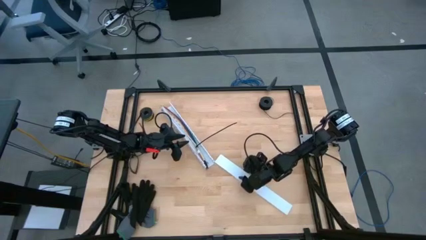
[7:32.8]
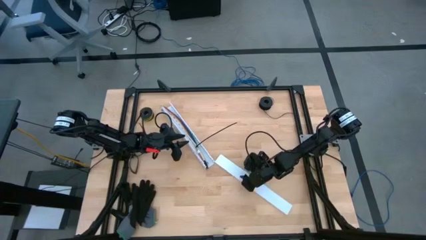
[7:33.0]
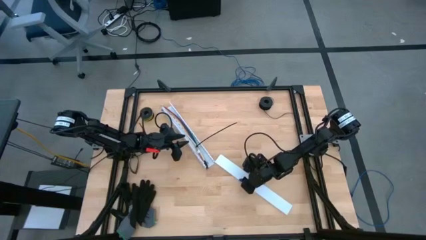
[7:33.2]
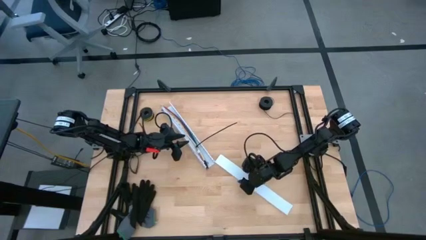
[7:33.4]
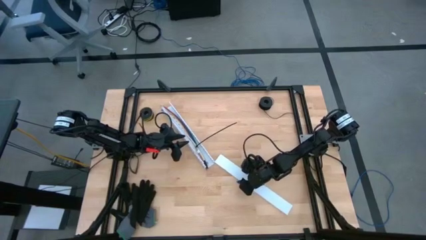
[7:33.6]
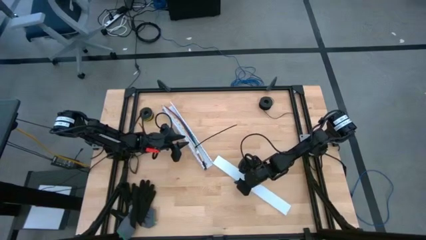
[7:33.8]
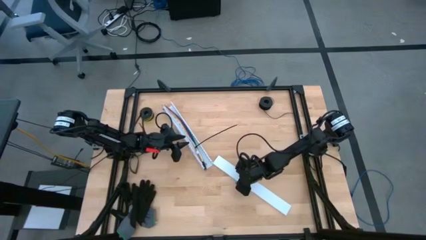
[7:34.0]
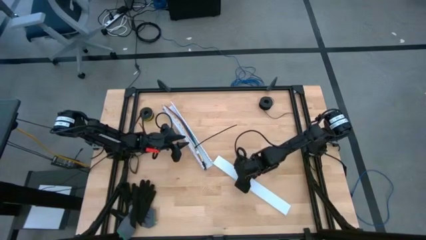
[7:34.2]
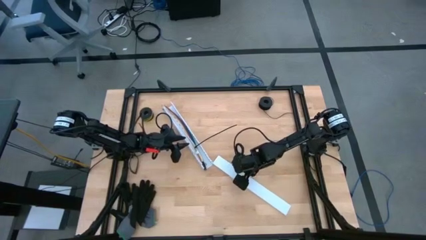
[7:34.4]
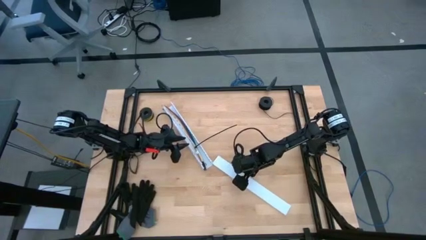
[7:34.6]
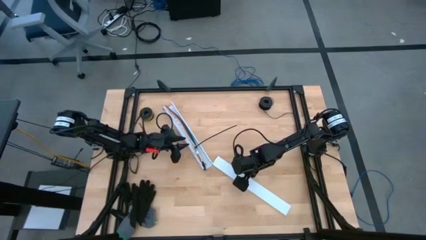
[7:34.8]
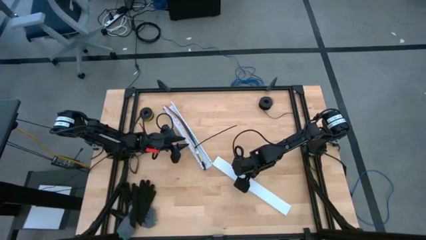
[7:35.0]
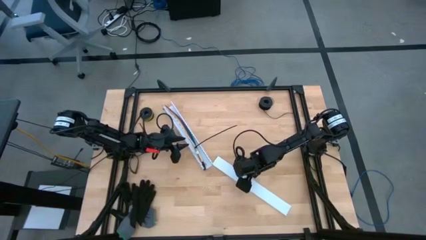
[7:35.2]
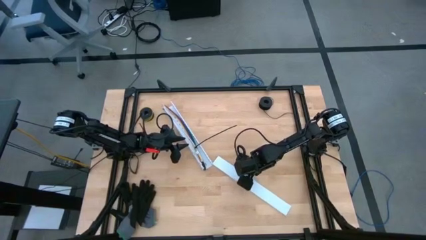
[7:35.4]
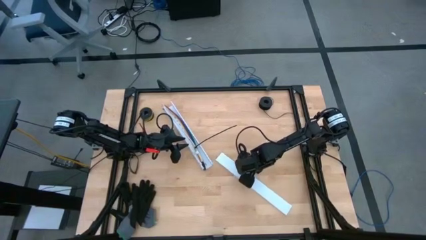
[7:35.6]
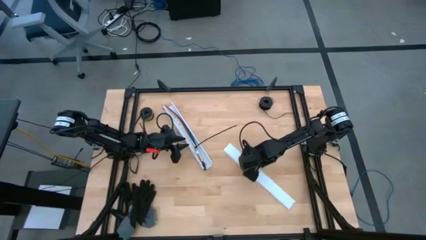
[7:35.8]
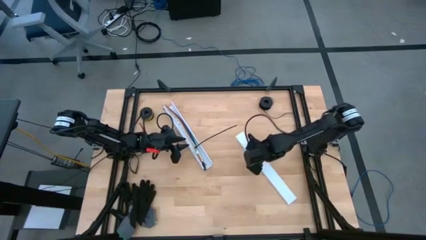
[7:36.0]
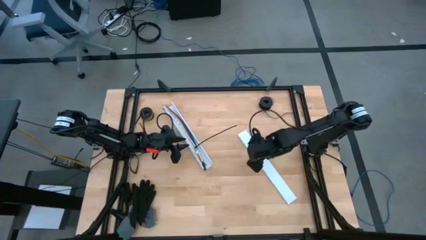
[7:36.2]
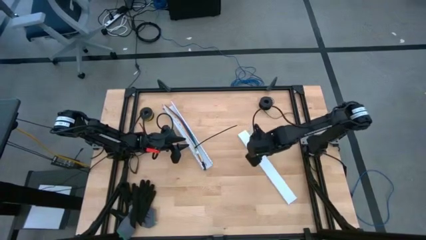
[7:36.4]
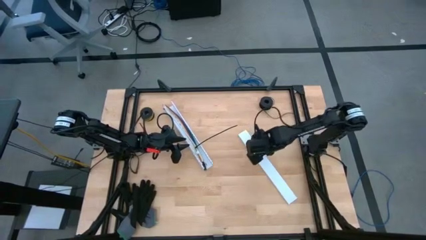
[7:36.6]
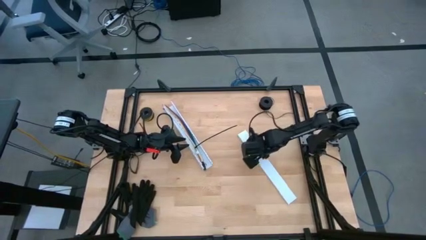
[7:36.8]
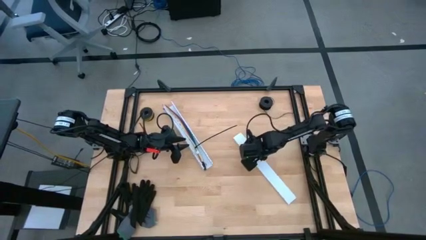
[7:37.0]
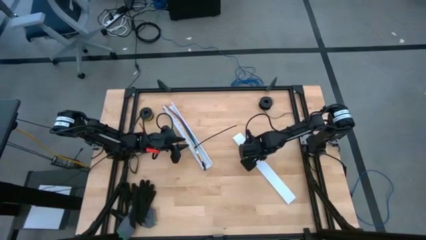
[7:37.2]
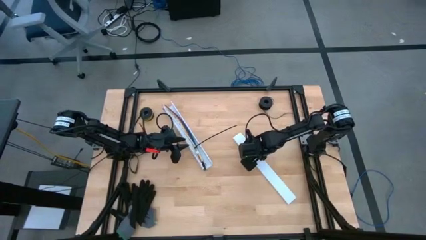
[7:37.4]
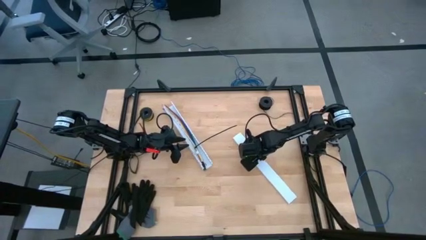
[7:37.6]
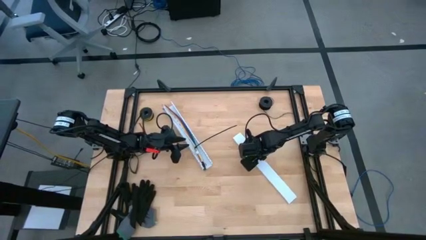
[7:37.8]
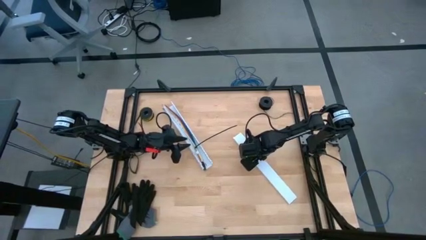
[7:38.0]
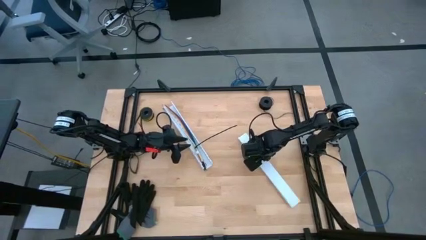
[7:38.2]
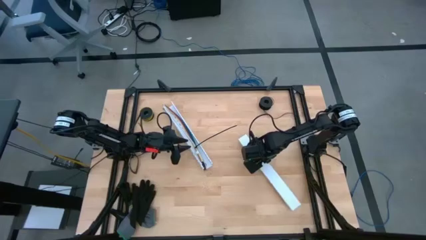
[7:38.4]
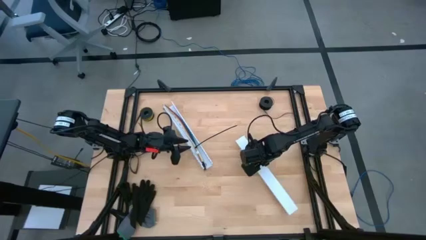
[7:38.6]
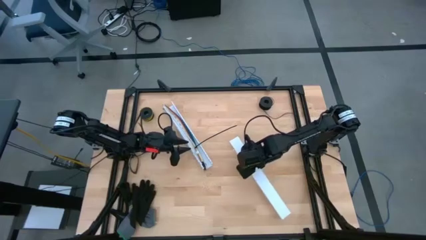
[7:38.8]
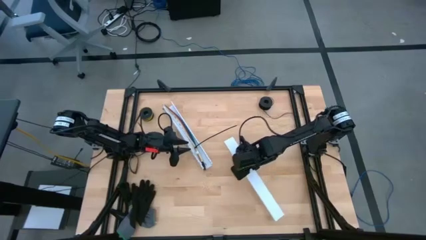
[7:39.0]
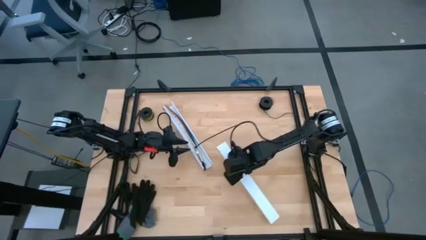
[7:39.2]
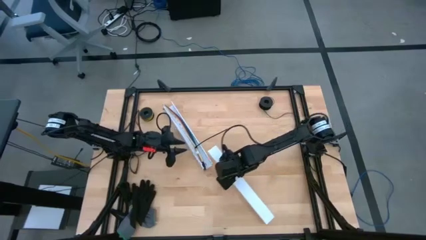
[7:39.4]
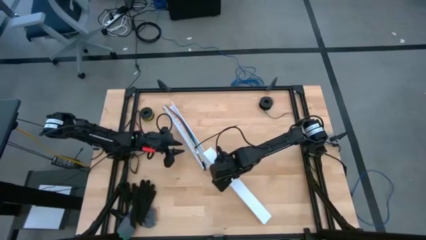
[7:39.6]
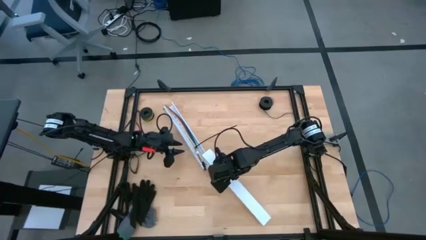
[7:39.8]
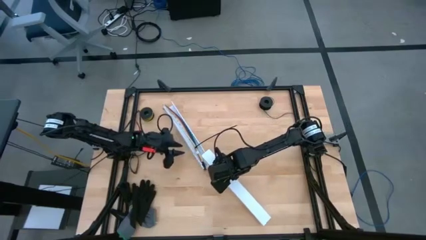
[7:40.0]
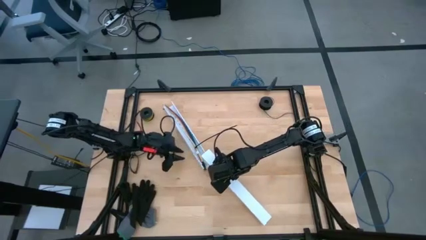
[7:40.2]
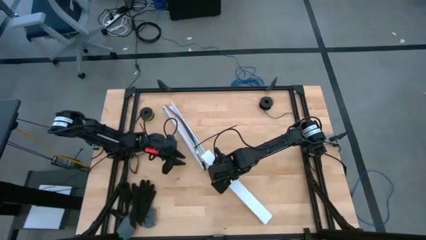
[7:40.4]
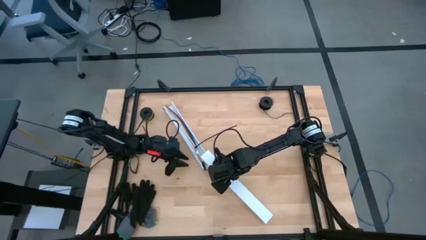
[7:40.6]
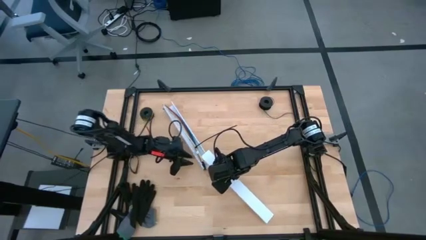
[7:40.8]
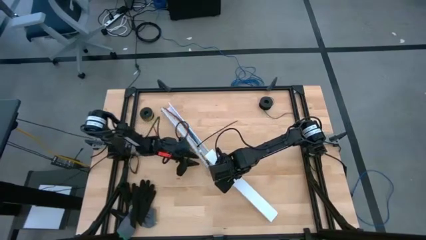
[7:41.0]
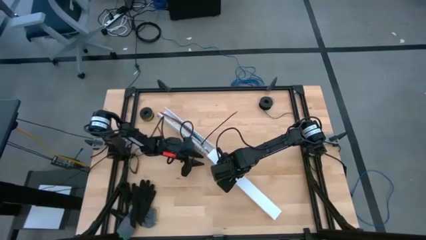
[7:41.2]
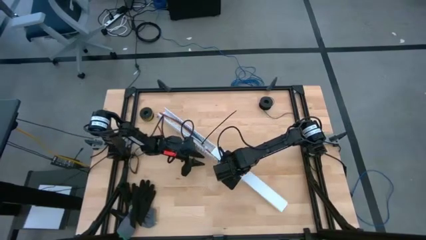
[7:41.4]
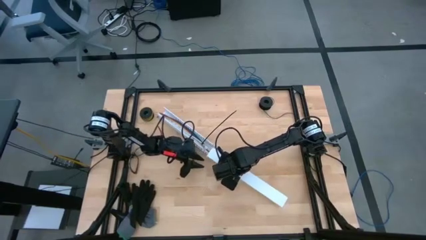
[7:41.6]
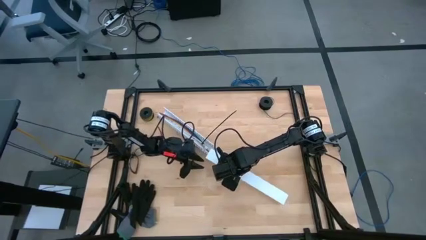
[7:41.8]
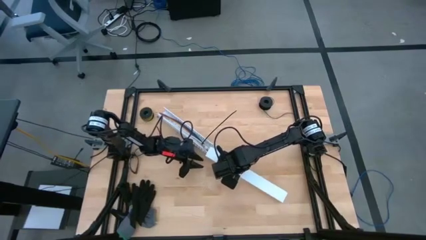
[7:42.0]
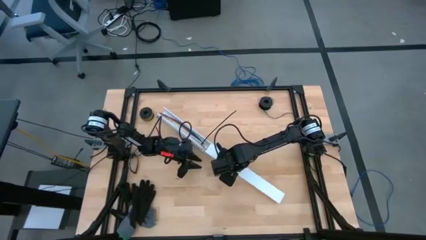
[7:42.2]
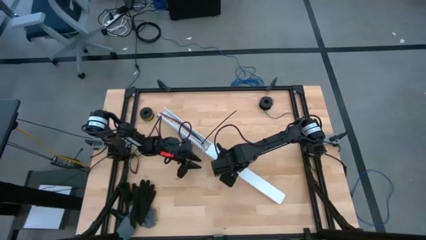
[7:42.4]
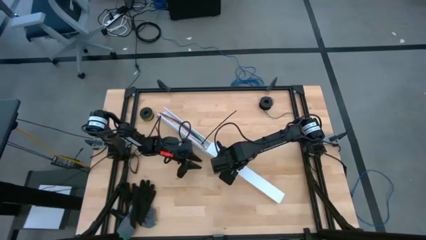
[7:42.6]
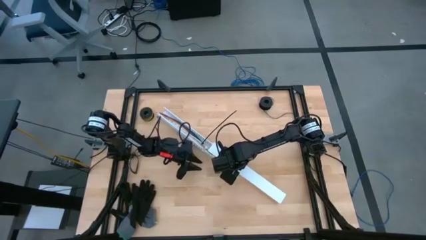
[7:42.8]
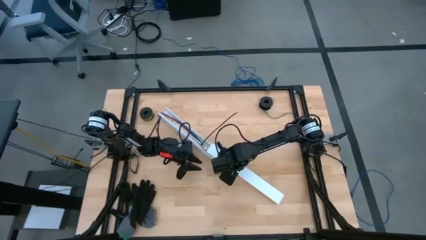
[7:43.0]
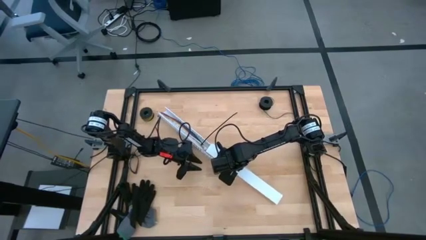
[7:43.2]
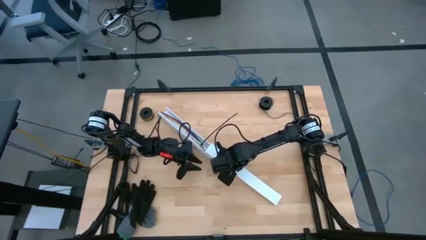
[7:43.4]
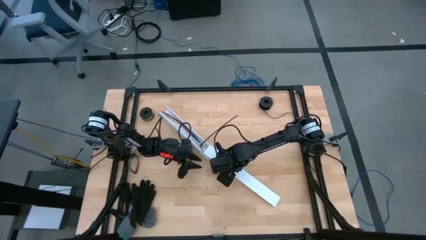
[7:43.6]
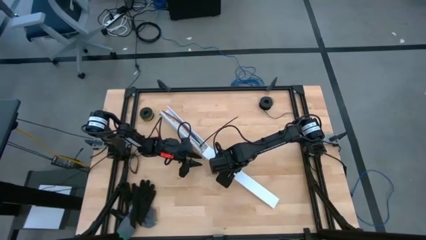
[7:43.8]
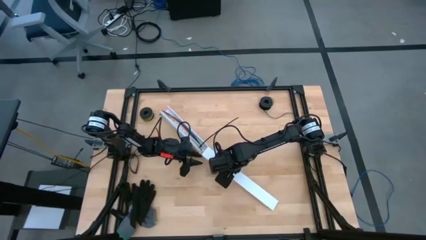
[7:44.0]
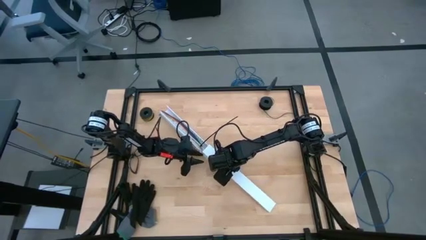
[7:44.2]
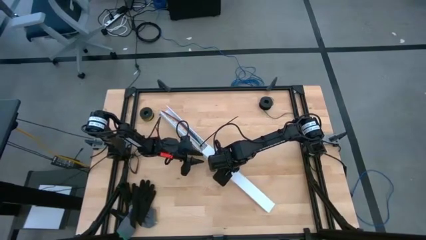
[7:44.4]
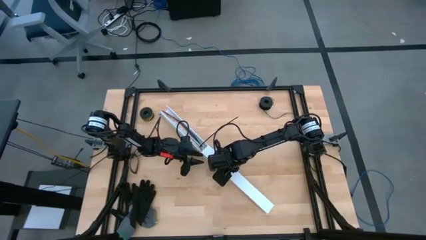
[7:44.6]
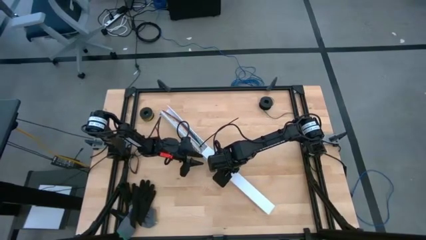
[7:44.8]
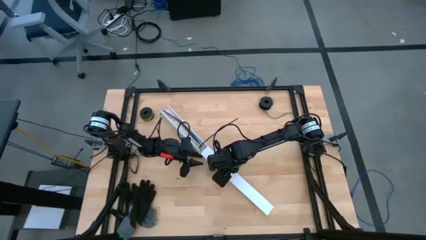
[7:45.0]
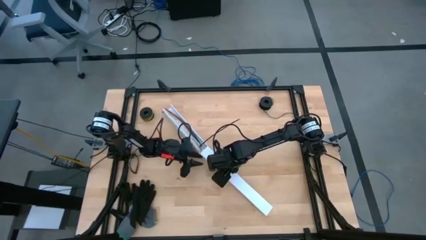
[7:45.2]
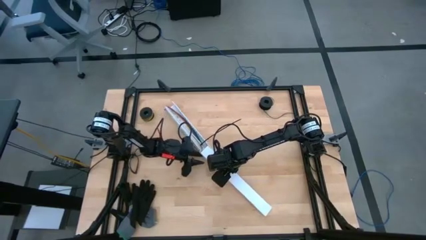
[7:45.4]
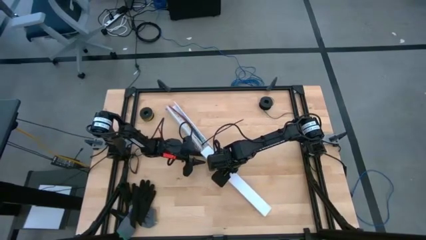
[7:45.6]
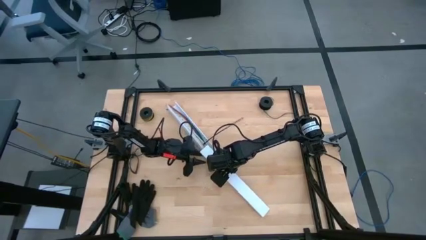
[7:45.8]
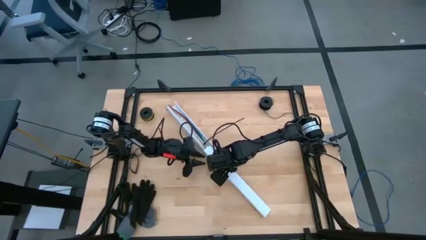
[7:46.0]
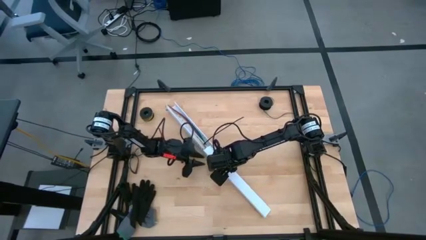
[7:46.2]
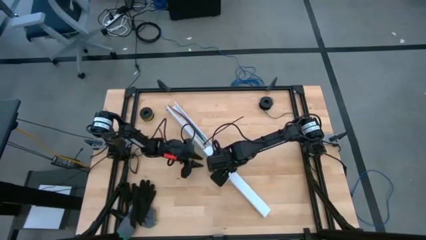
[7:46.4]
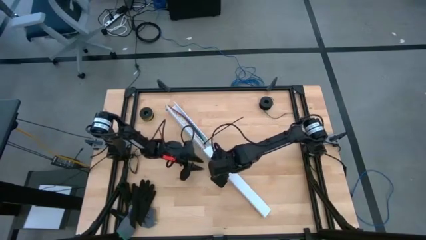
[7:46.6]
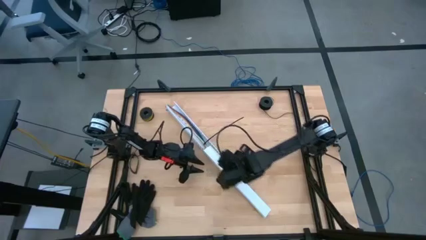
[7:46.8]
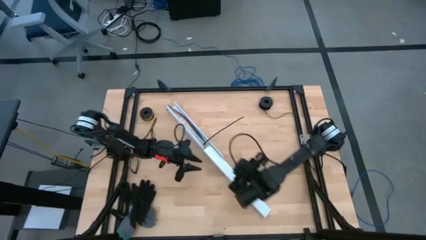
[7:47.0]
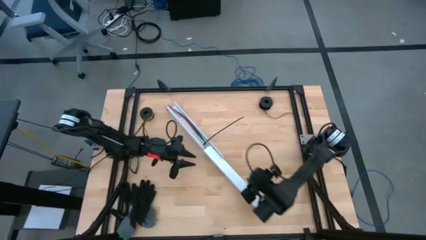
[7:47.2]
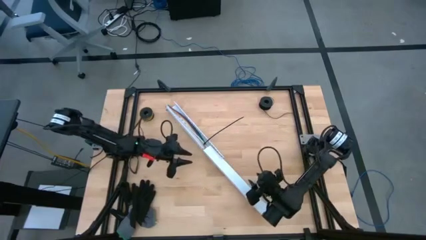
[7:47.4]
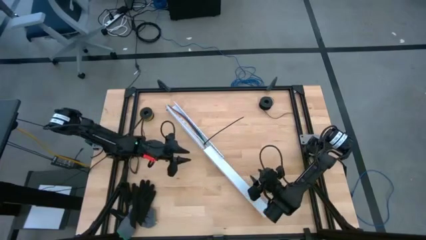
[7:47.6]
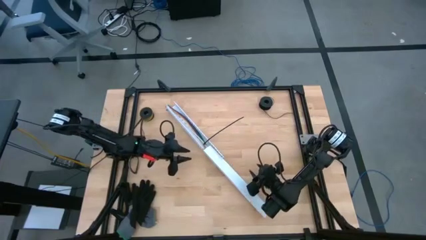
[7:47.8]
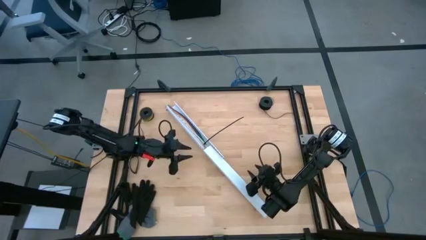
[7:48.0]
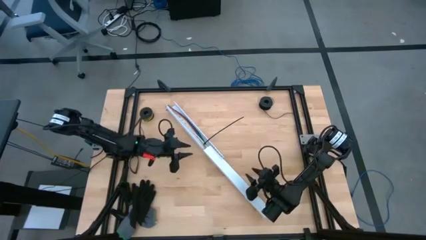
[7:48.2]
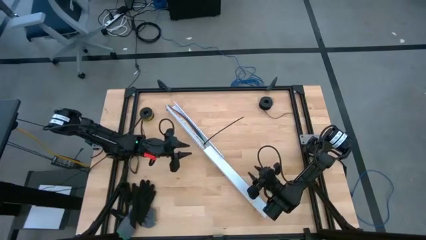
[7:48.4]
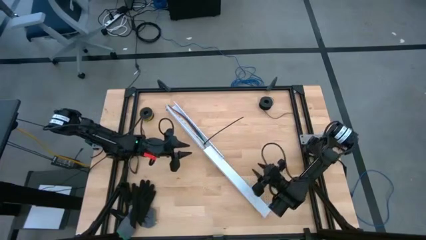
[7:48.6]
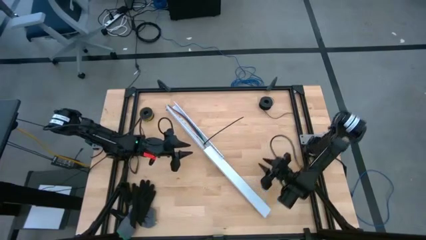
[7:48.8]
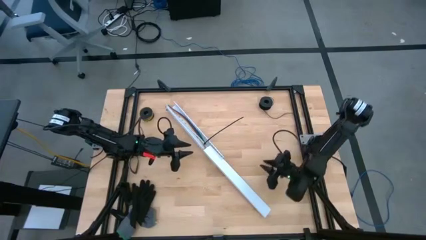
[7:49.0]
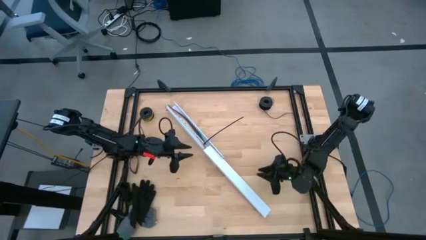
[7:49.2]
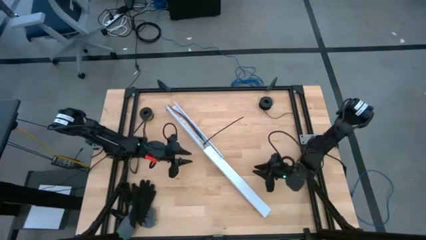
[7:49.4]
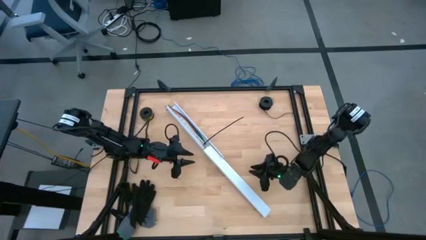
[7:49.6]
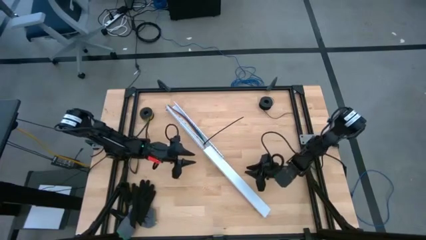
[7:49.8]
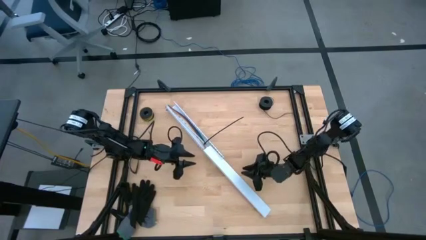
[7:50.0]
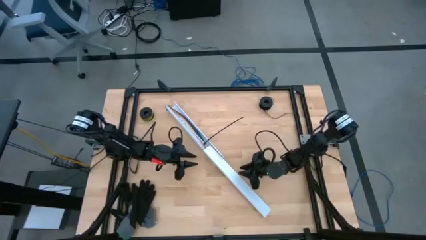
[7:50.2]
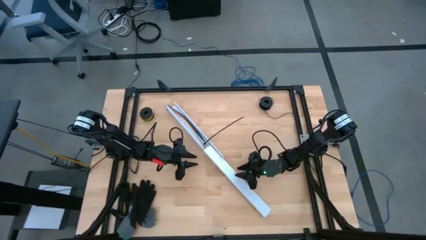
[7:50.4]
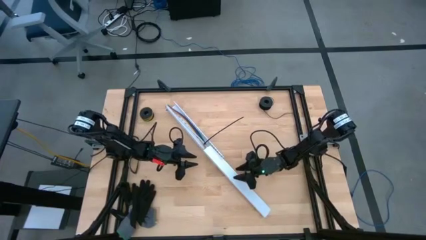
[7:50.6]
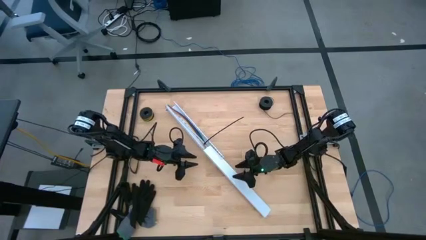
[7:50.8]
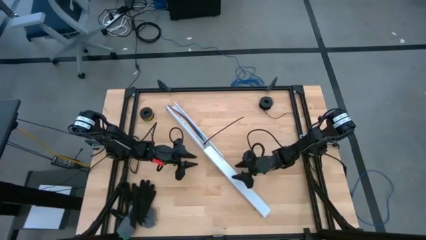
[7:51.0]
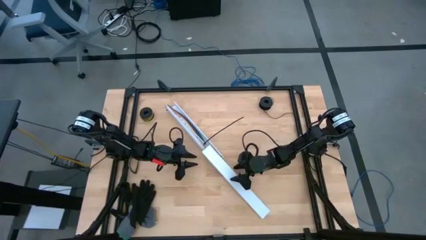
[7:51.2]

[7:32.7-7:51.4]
Task: Ziptie cables
Close the white cable duct
